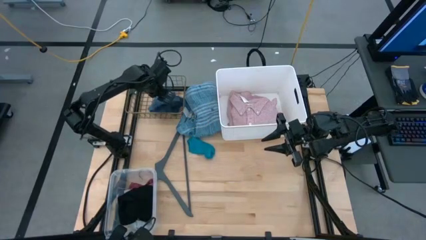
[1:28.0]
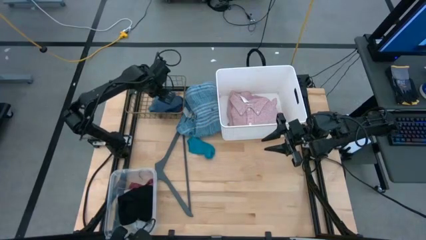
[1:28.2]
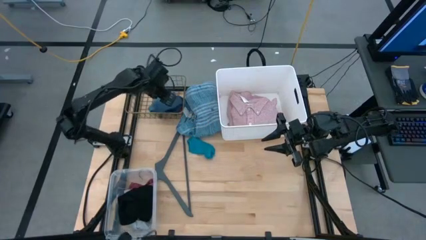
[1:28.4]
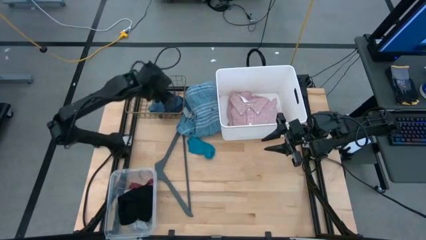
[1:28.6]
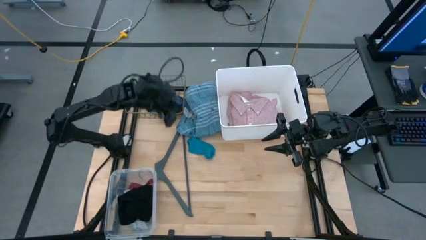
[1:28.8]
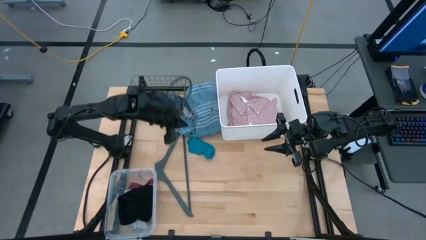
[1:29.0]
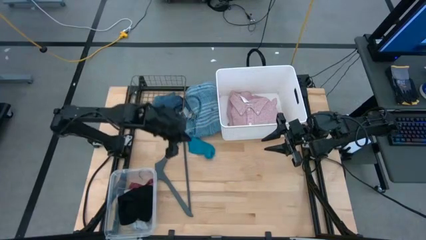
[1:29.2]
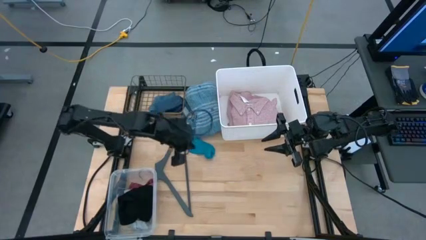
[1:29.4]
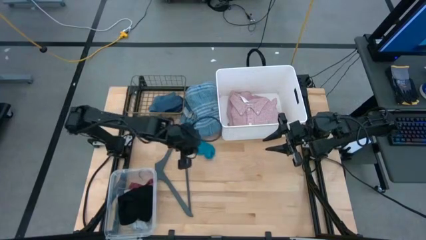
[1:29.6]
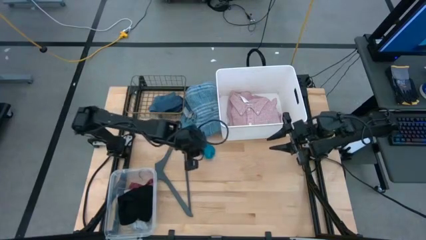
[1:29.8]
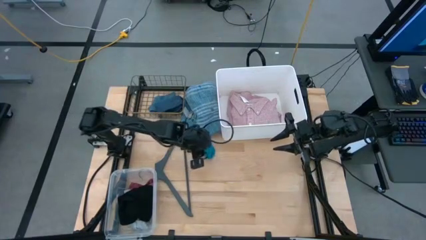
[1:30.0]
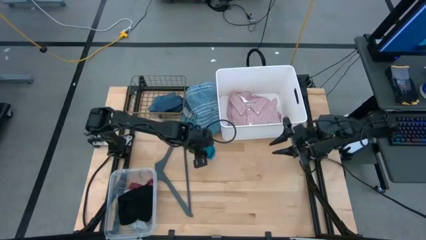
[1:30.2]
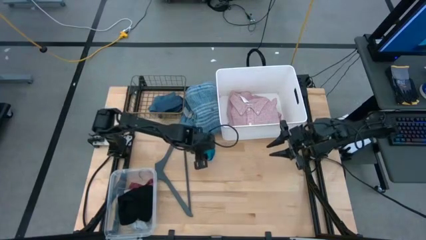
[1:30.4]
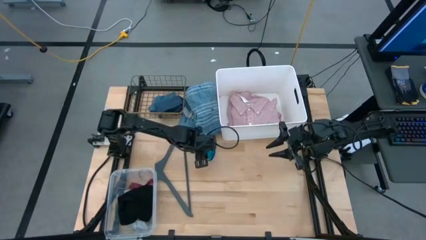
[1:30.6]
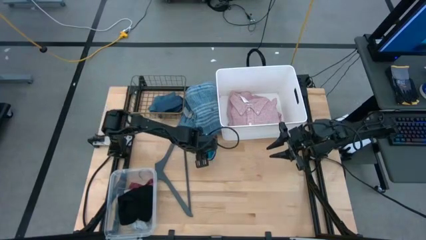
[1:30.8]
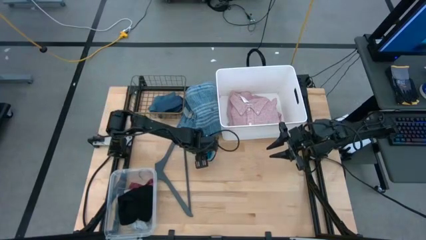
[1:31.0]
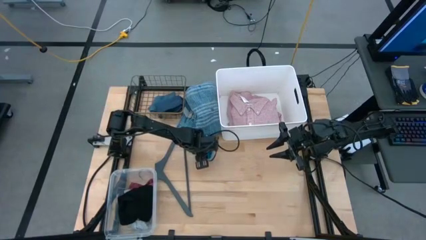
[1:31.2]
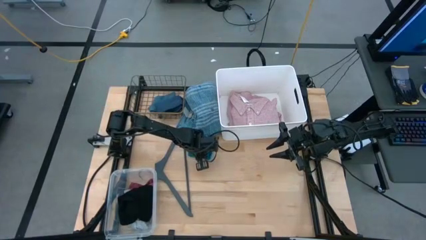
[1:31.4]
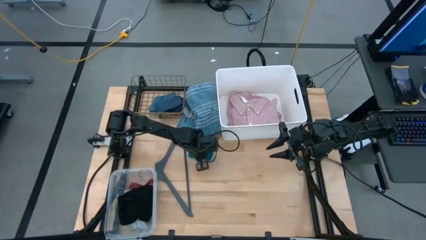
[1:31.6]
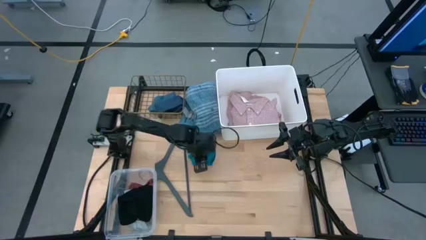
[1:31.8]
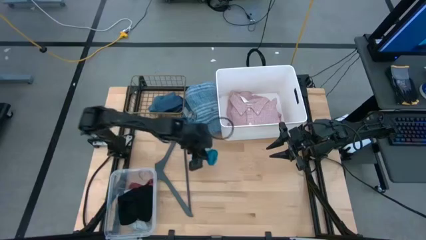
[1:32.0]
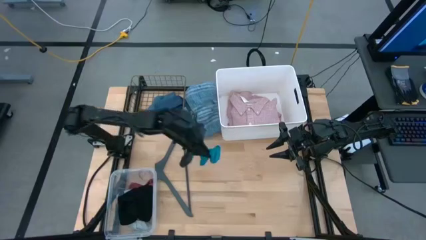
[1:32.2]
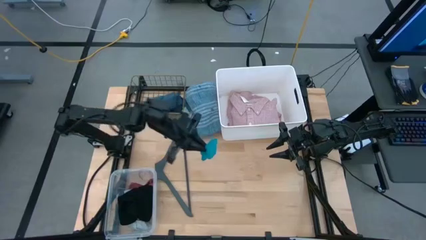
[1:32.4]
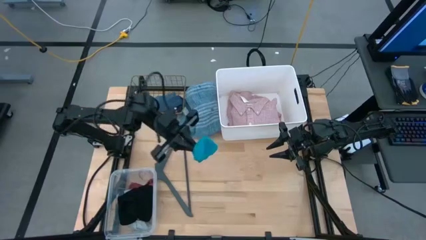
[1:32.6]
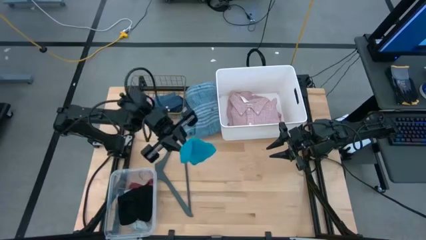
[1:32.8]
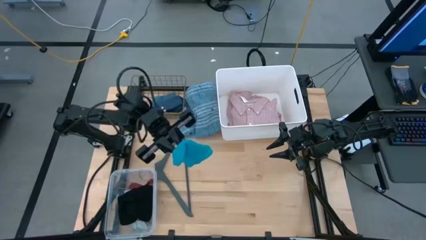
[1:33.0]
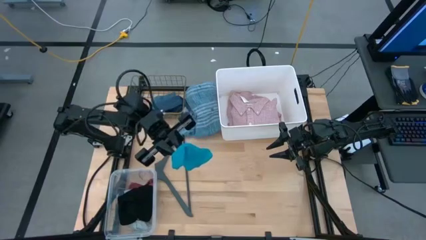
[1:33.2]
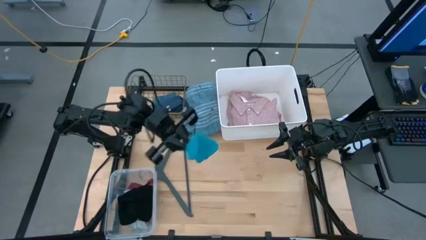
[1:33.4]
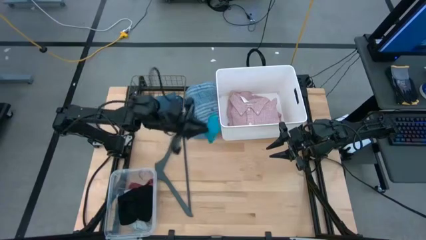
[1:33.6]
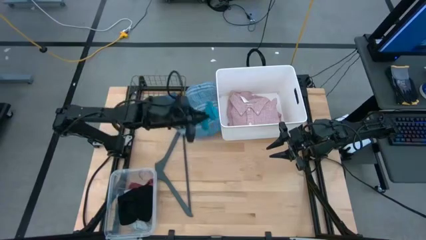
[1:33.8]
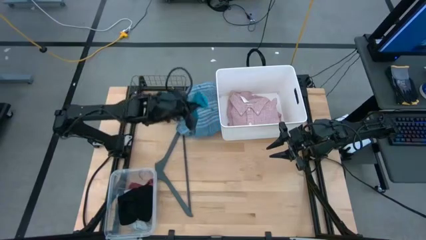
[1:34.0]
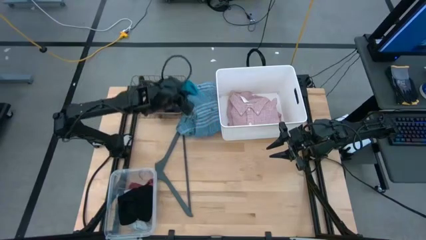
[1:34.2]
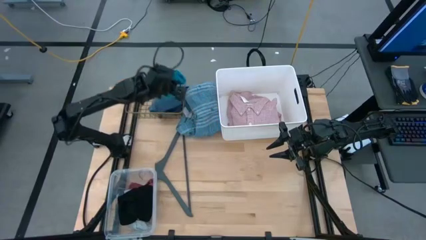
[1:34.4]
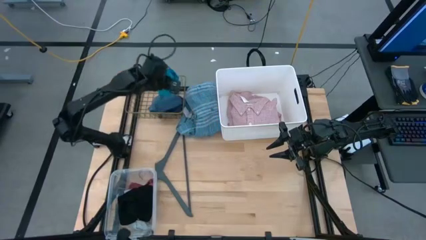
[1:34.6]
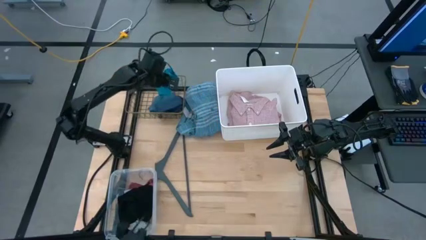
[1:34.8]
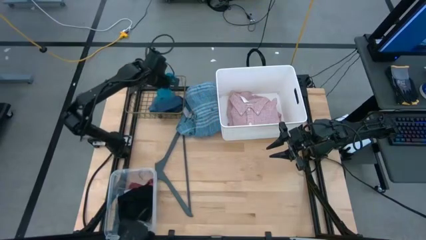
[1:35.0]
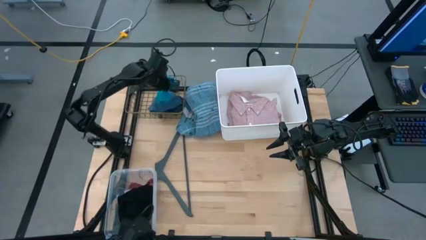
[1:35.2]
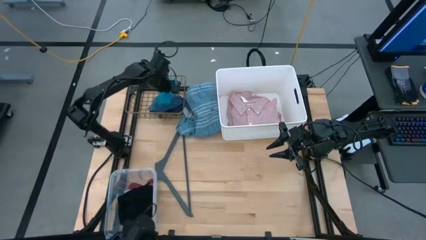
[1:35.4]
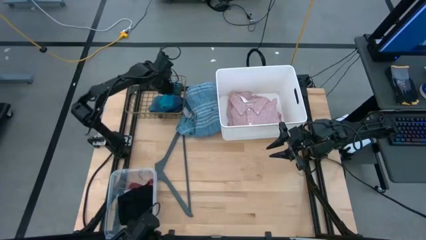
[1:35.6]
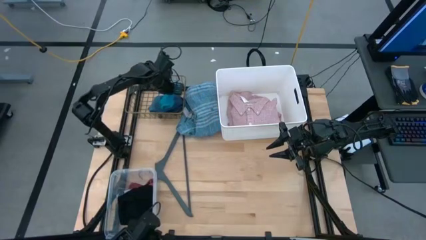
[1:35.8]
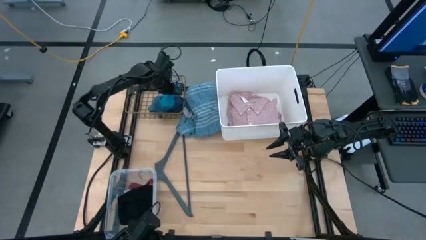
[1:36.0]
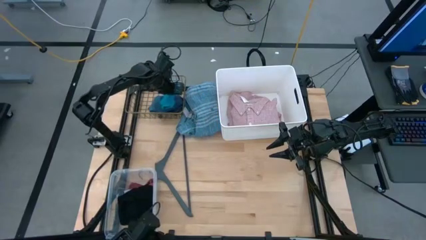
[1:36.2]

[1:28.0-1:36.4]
Task: Pick & Place Cloths
Put the light blue sock into the black metal basket

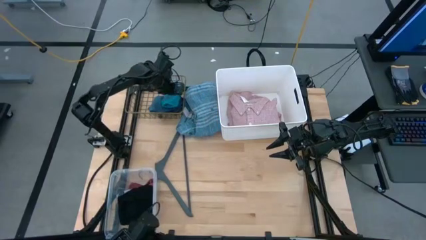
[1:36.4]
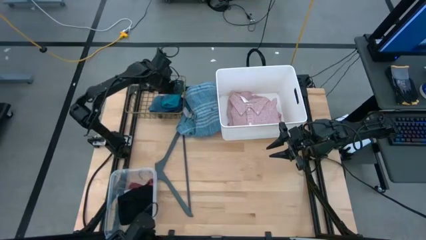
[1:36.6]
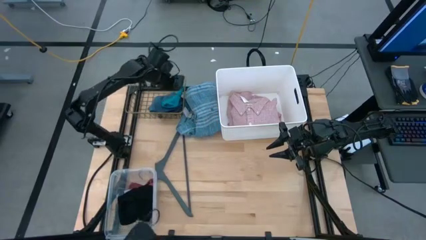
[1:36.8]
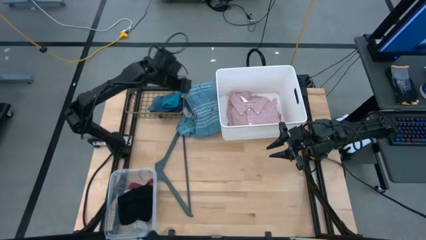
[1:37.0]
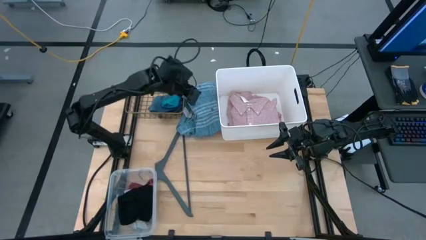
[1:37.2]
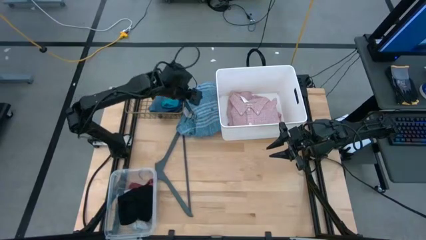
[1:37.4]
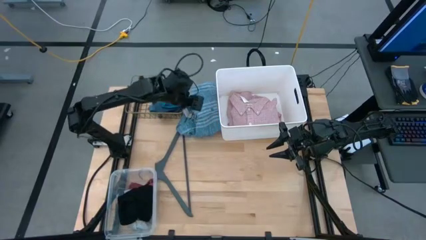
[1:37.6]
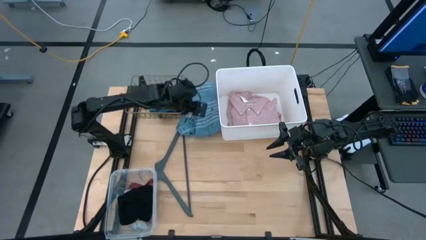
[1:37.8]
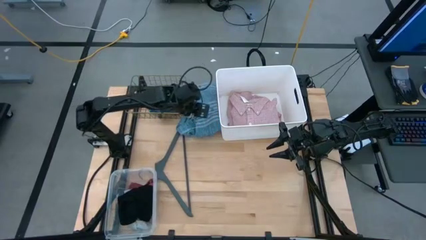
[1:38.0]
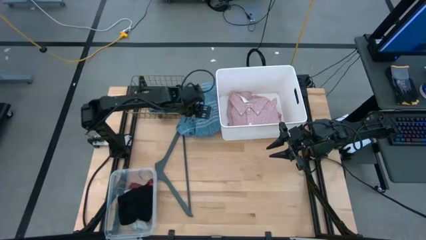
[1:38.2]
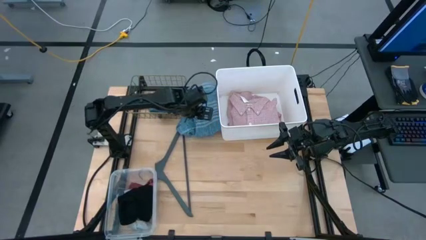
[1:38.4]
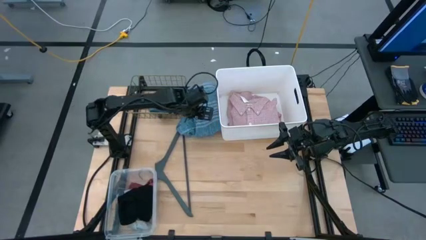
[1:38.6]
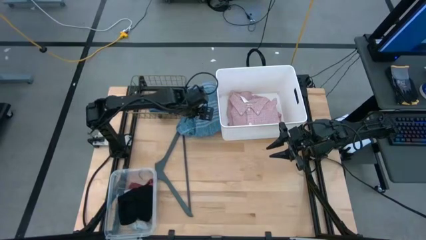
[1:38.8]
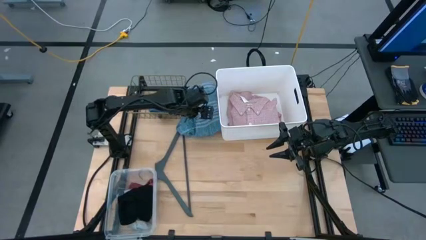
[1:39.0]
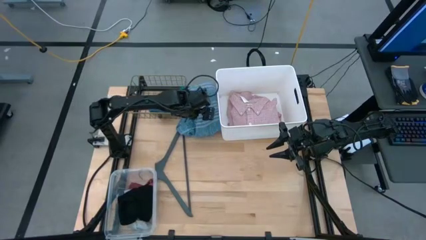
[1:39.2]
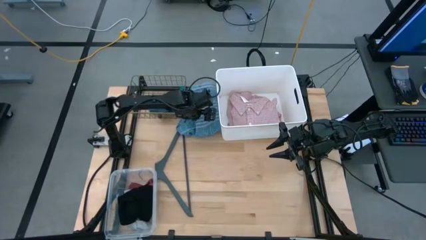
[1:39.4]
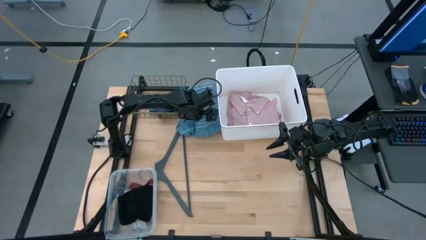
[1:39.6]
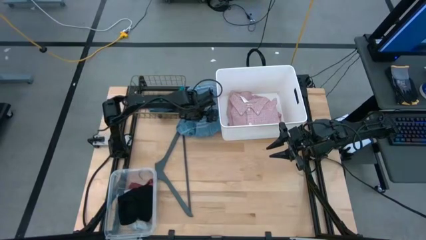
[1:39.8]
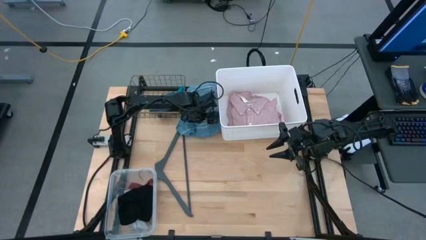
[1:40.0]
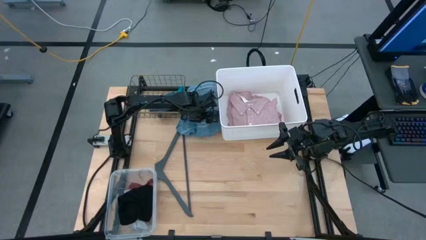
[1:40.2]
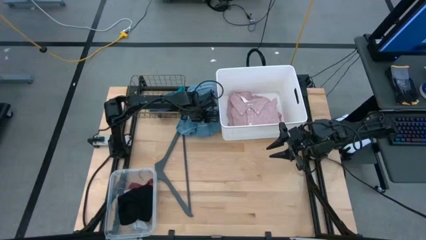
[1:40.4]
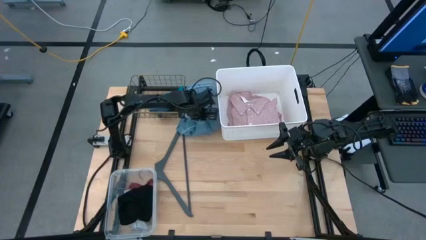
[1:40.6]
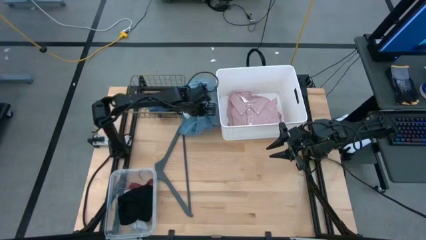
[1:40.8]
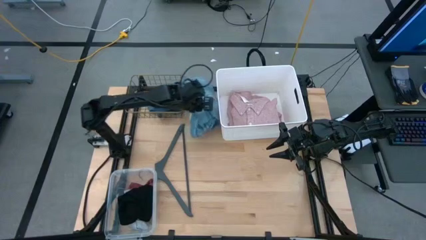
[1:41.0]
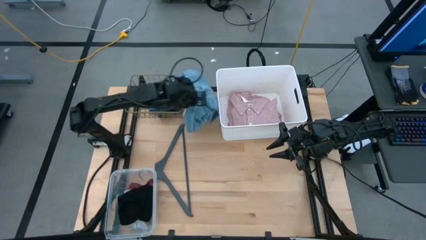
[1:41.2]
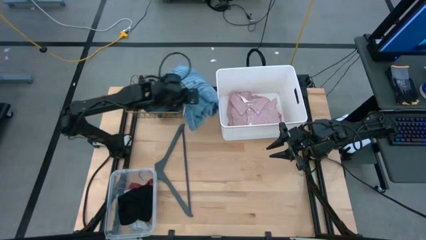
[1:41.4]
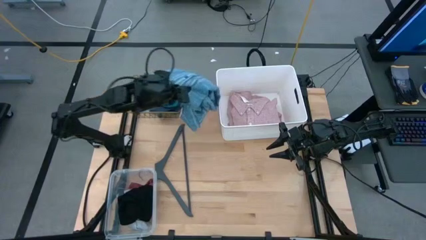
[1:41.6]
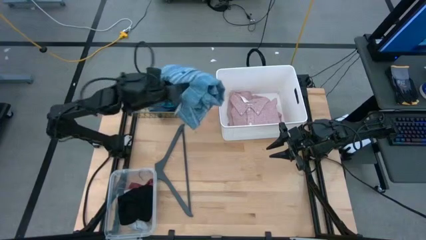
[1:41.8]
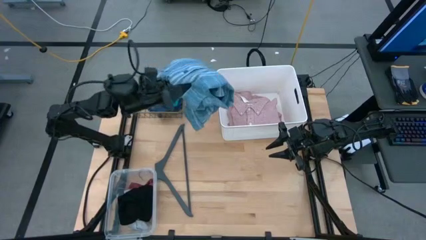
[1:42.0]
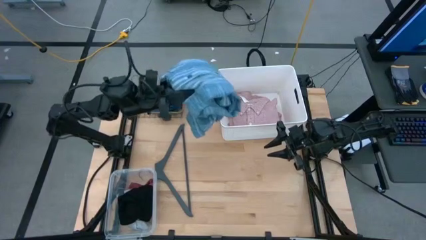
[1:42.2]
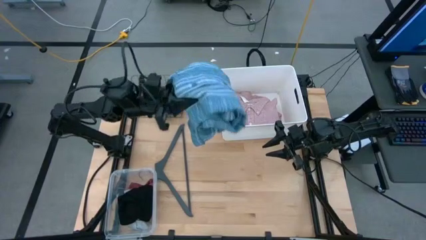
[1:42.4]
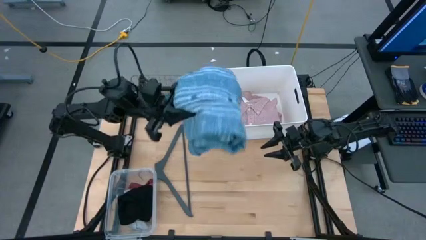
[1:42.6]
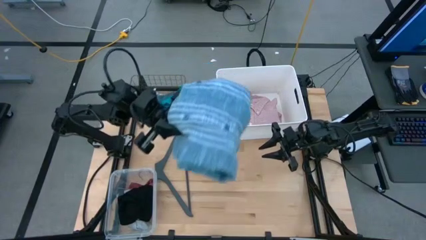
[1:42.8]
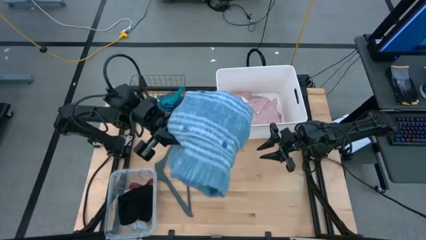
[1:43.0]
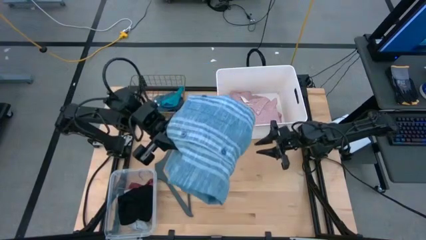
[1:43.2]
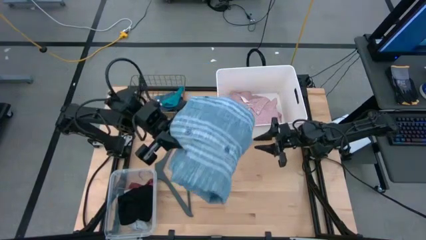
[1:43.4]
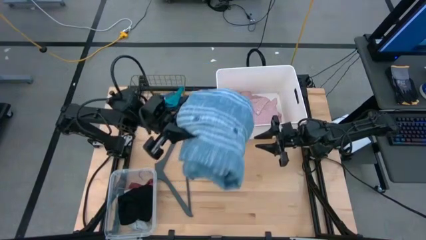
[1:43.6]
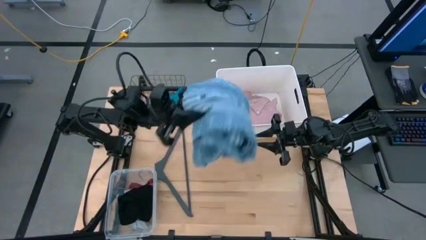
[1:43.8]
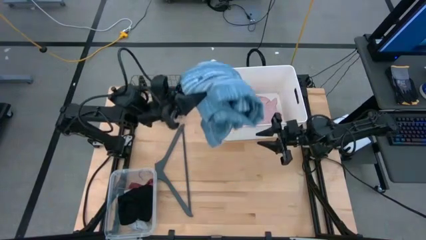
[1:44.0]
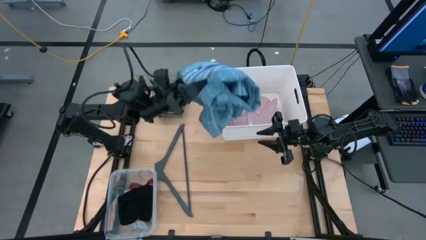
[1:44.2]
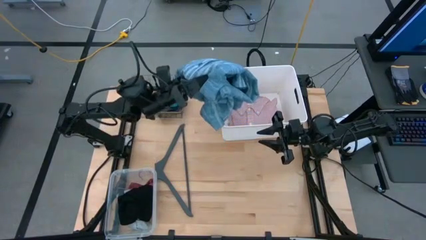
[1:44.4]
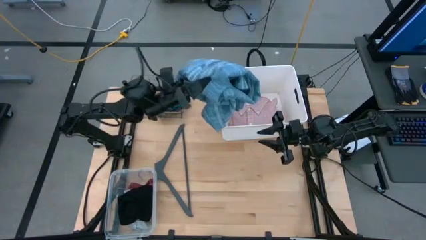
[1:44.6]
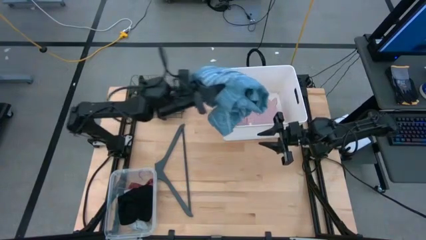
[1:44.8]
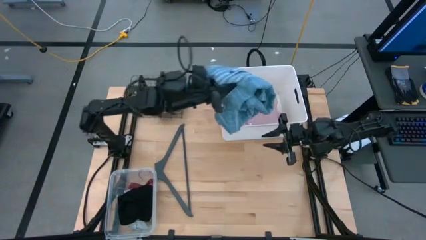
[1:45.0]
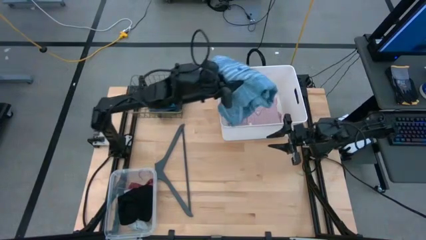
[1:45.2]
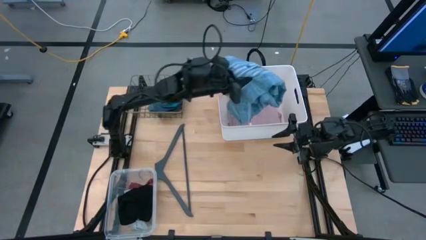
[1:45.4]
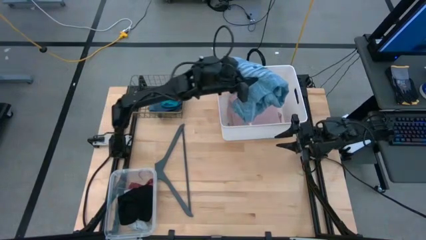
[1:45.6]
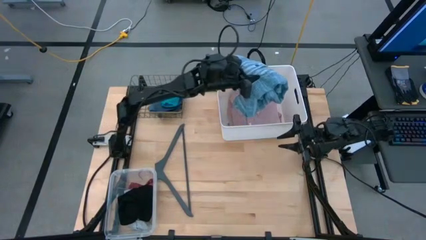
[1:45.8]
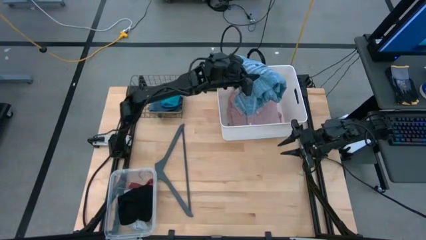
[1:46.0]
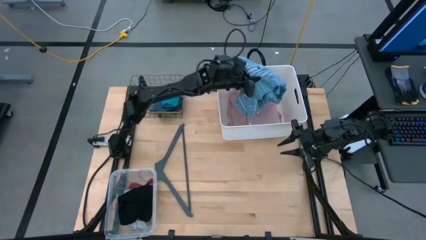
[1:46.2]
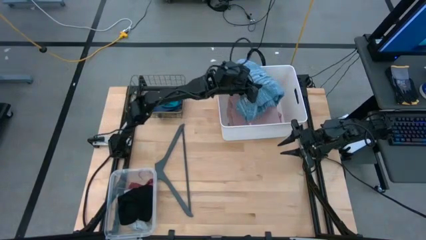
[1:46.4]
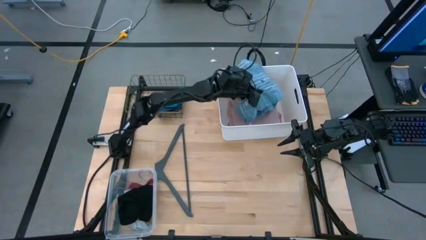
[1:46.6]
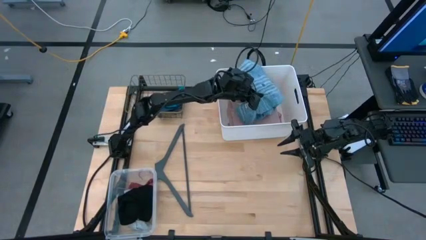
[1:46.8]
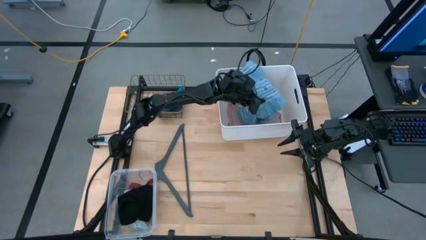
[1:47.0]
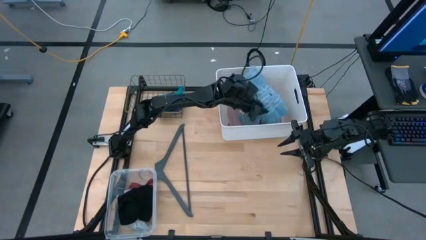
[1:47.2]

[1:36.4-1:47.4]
Put the blue polo into the white bin
